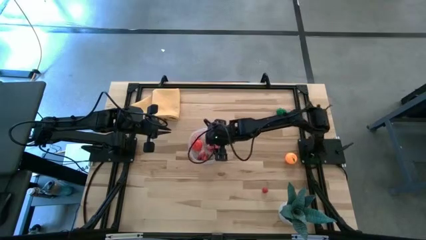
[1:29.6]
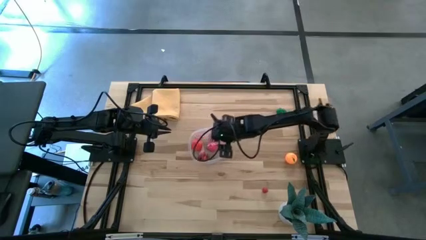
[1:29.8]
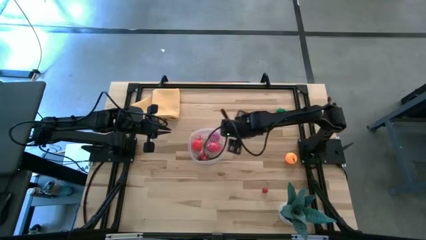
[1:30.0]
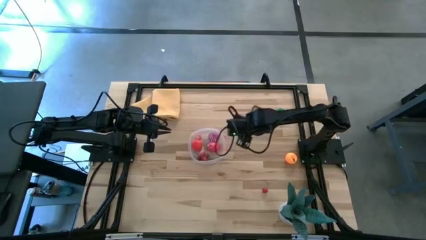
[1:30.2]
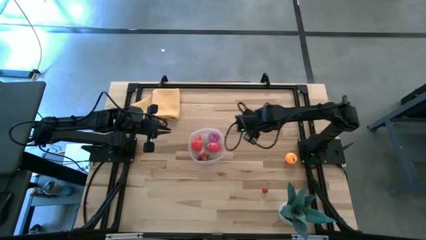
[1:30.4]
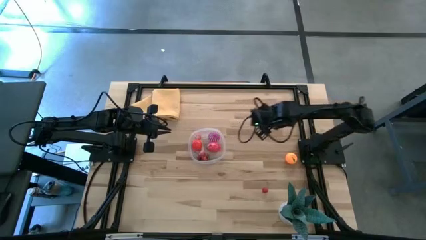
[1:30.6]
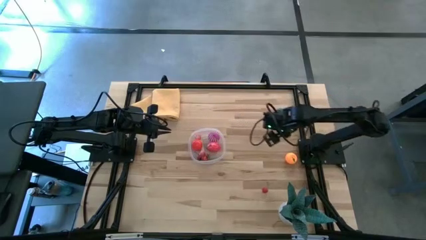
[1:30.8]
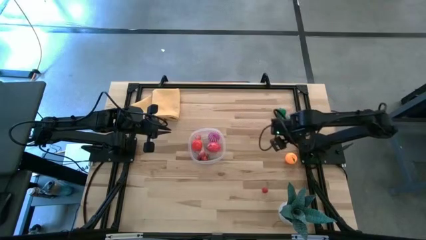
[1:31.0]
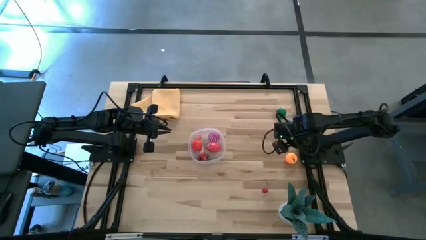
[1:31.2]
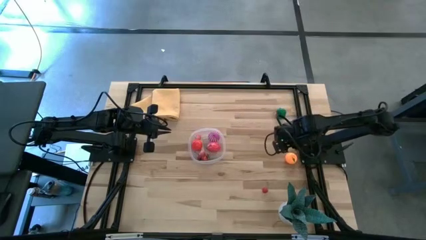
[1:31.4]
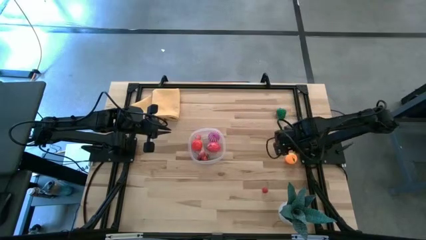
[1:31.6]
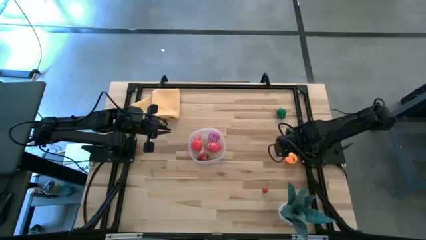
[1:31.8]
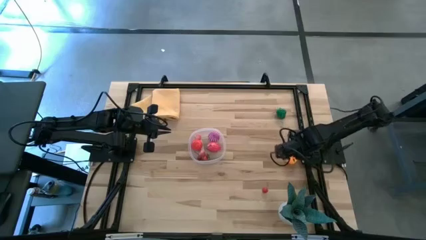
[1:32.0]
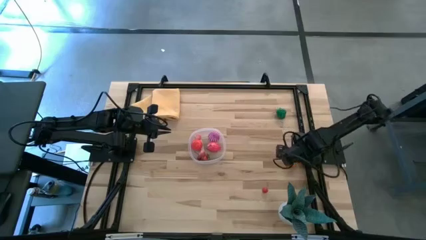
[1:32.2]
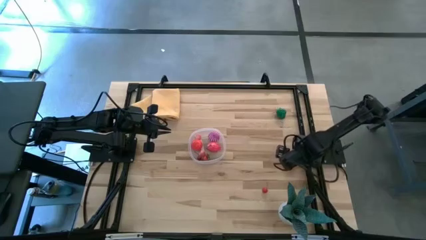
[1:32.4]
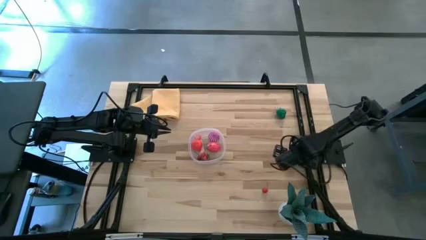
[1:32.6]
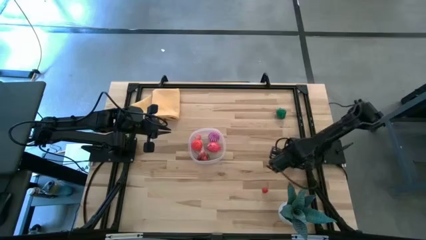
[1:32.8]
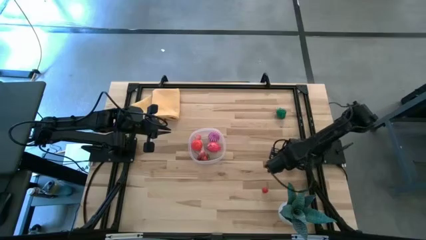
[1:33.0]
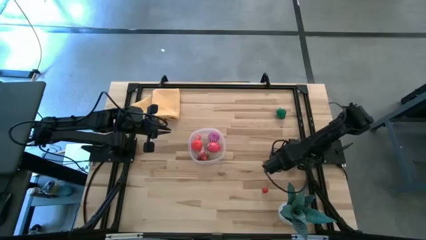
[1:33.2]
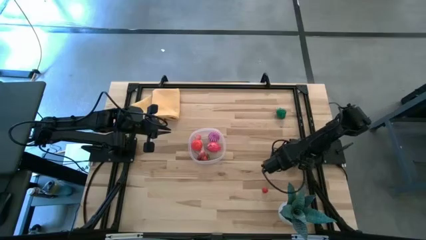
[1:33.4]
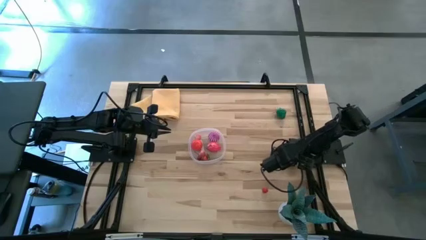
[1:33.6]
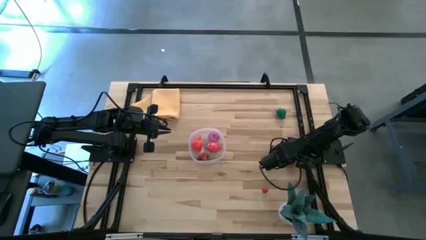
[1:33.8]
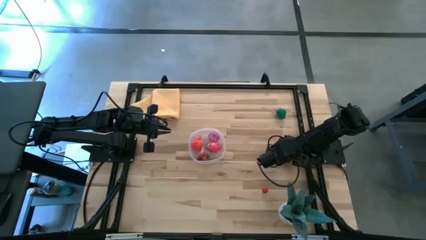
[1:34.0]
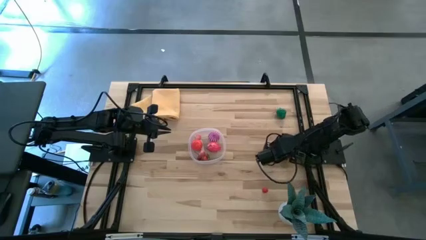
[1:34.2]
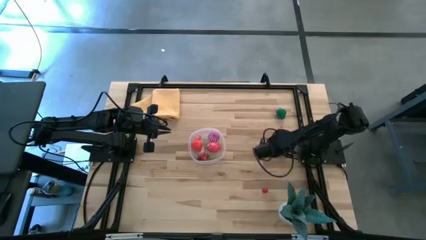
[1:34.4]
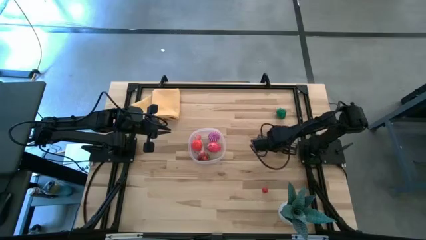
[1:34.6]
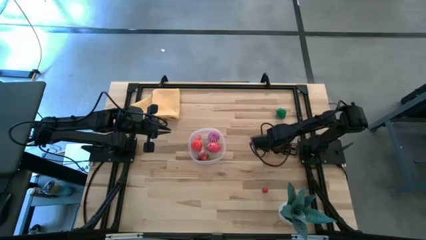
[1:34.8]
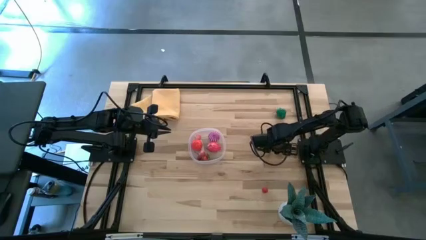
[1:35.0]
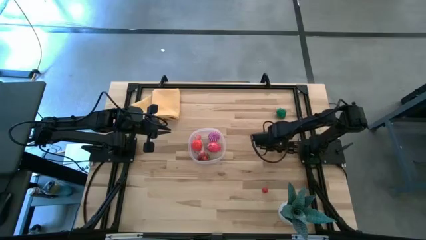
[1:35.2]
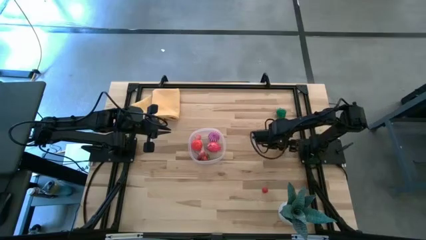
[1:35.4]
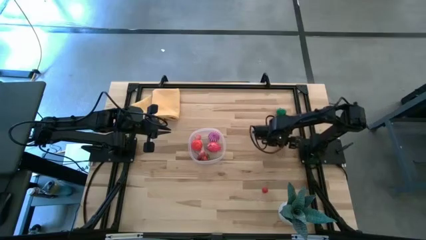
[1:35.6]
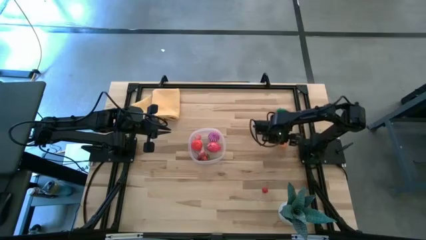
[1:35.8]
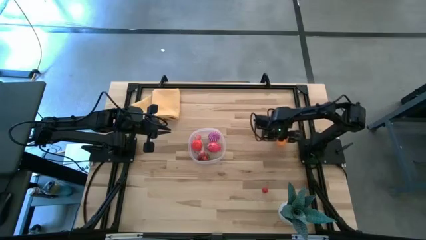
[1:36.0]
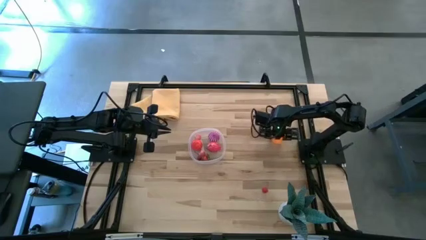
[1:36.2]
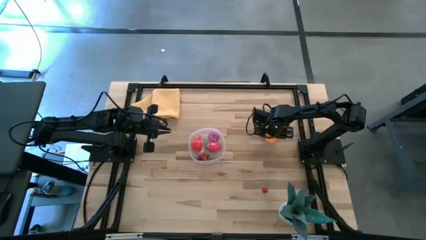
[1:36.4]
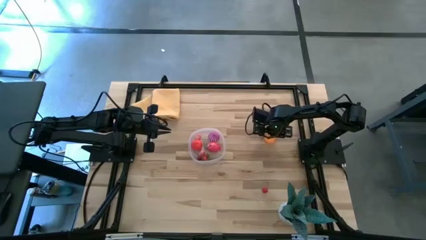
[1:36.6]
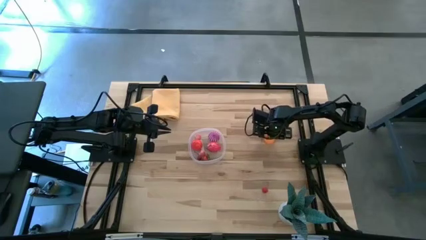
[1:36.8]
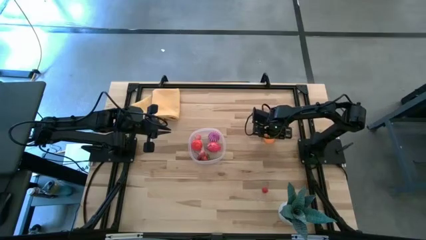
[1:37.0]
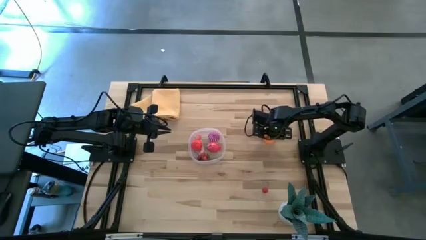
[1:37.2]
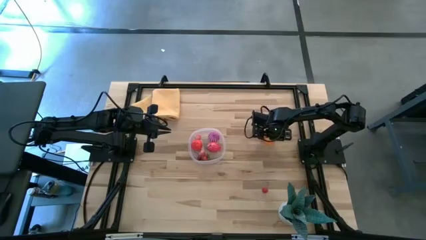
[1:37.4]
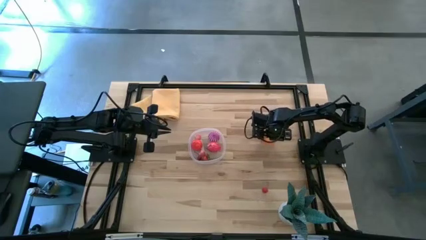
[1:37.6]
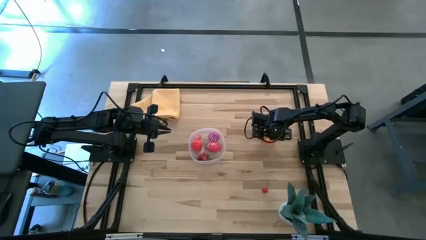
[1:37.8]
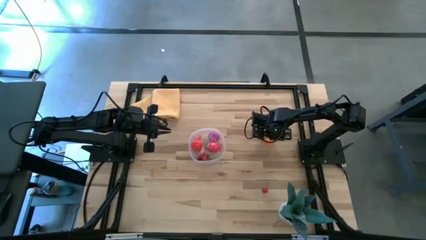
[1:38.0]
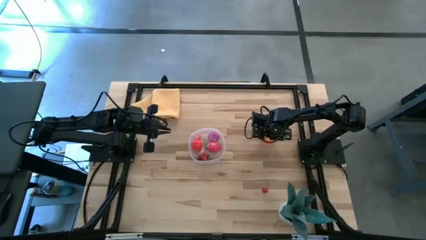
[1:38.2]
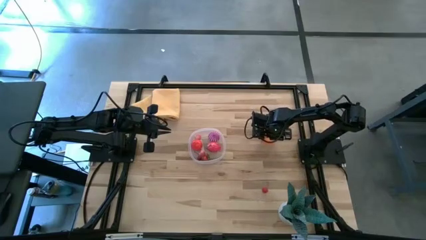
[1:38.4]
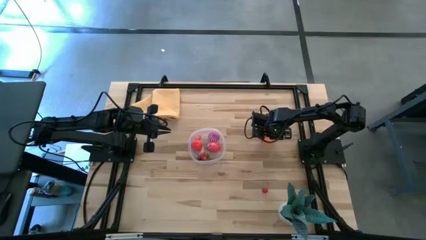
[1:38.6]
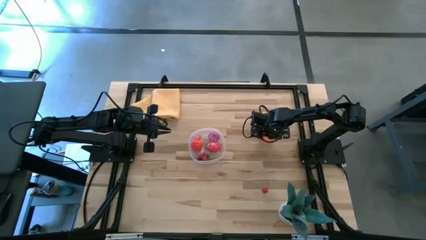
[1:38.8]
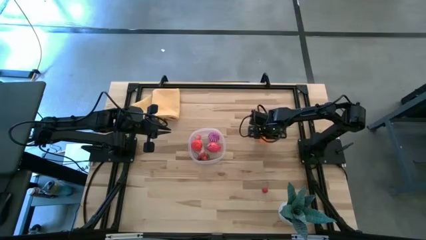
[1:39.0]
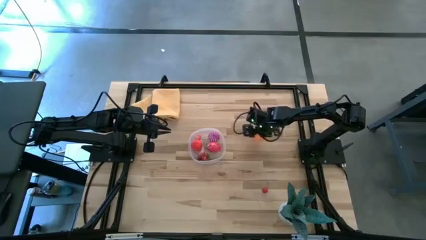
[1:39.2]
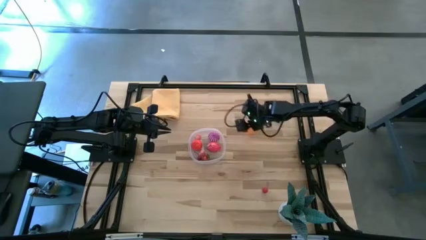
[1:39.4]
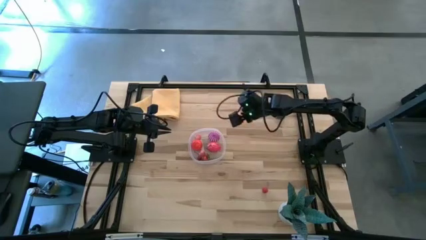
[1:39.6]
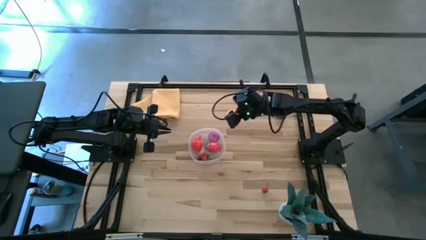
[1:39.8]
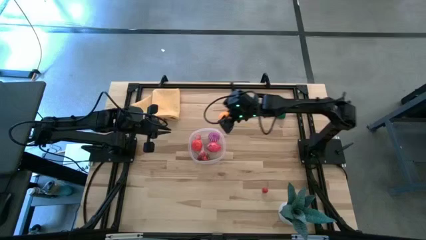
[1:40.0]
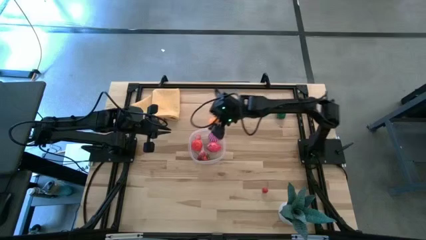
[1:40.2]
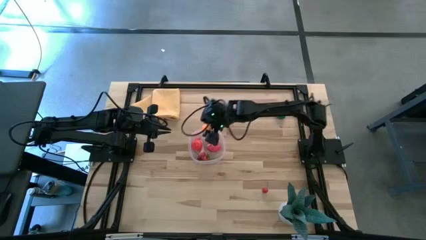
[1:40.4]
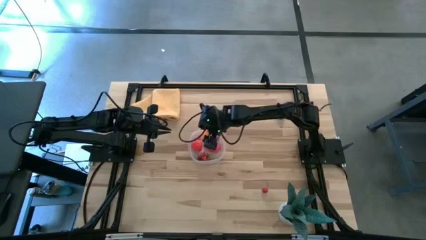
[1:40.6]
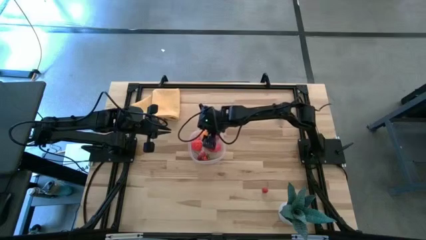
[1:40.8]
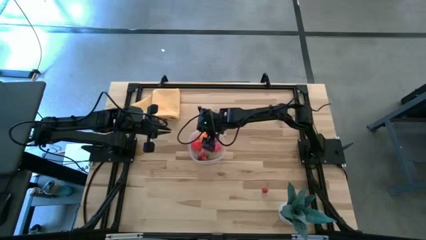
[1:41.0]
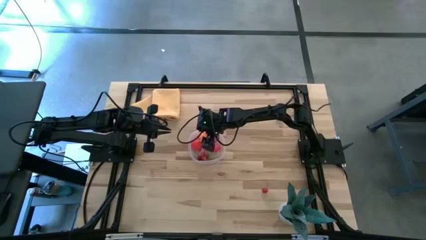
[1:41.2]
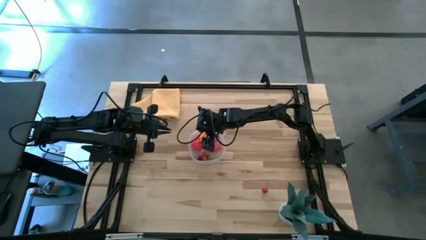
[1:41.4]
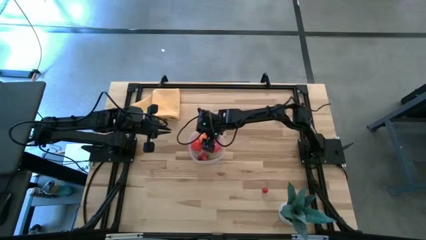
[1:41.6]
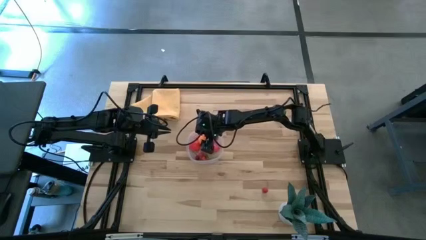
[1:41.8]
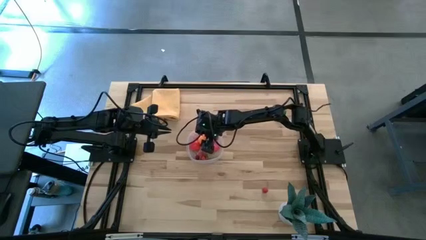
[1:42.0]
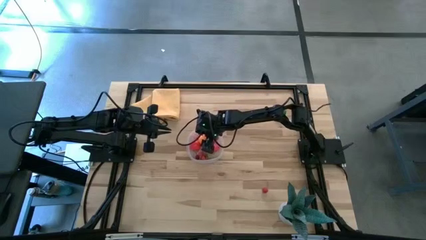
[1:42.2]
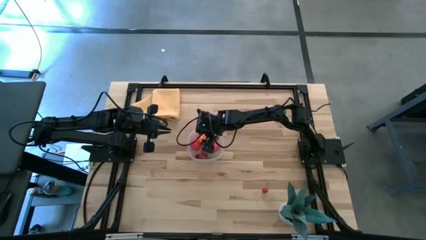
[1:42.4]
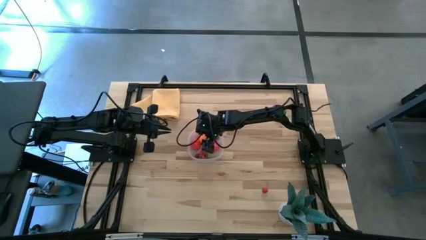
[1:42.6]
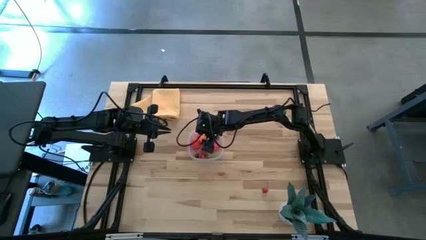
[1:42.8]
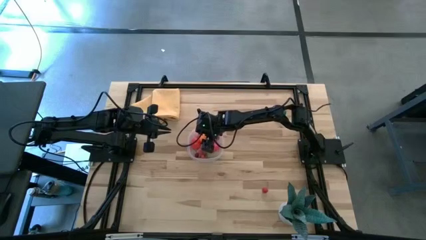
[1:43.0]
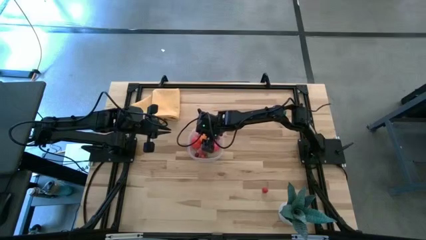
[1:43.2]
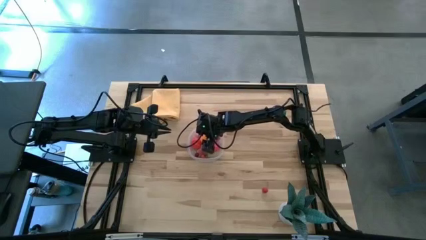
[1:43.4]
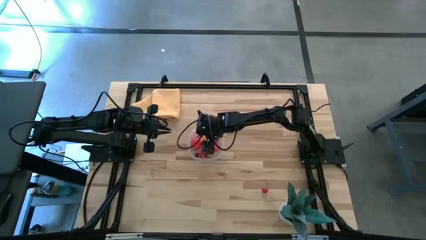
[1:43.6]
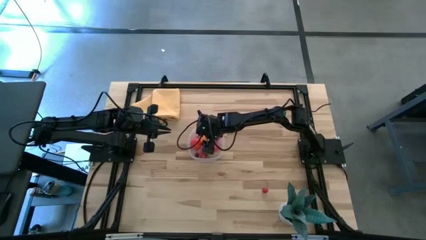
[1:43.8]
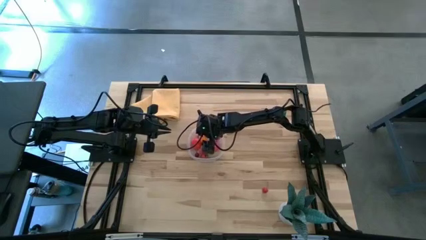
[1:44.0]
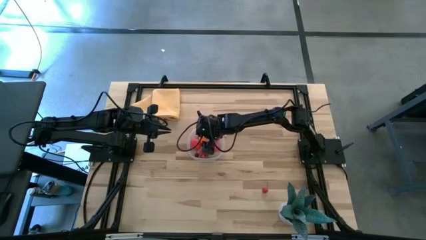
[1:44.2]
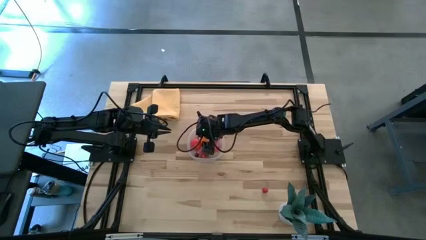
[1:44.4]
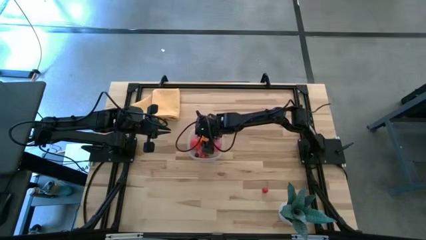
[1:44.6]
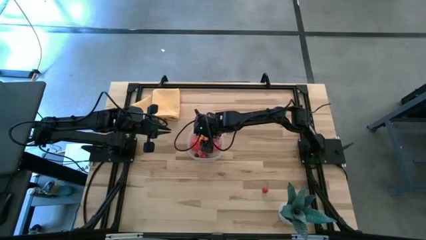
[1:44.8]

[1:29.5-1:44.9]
Task: Pick and placing Produce into tupperware
Put the orange into the transparent bin
